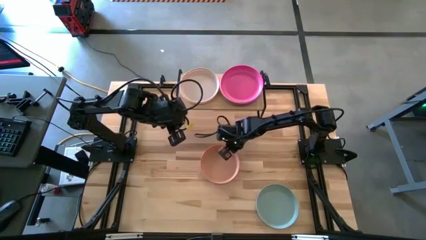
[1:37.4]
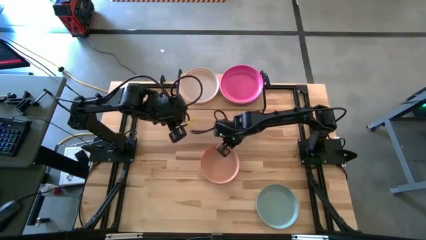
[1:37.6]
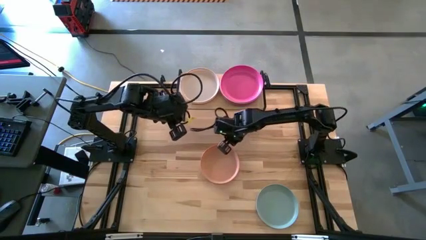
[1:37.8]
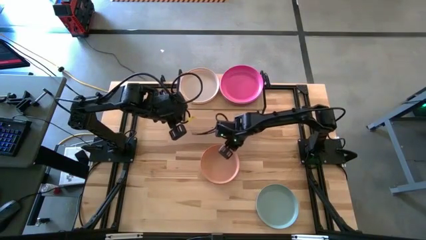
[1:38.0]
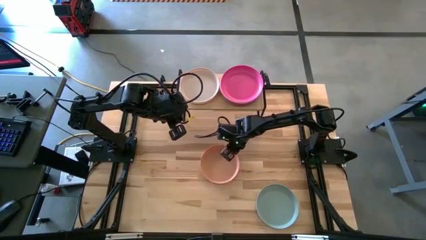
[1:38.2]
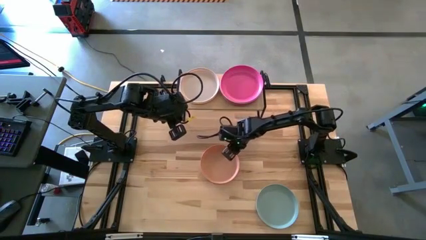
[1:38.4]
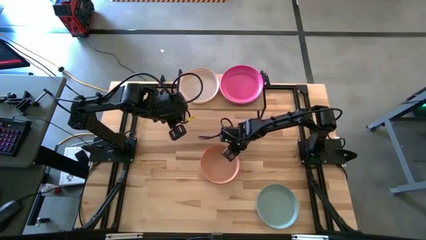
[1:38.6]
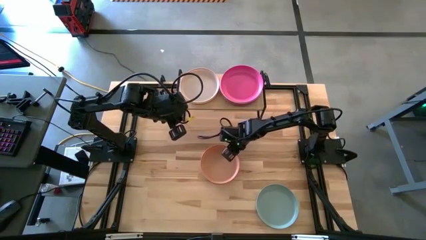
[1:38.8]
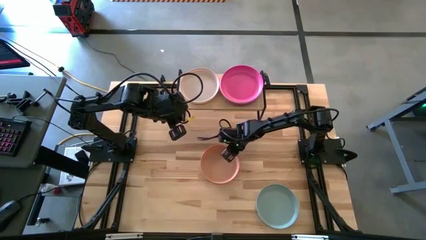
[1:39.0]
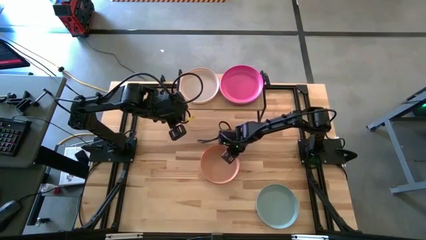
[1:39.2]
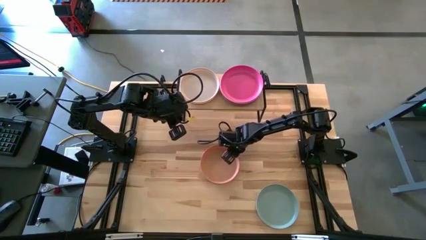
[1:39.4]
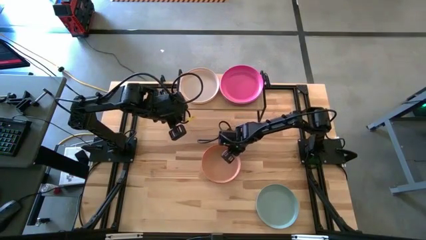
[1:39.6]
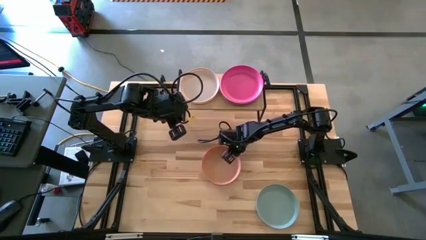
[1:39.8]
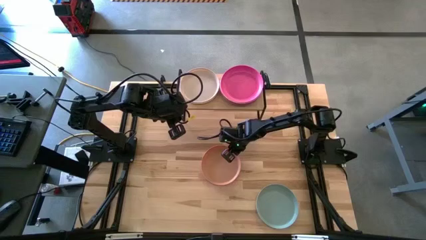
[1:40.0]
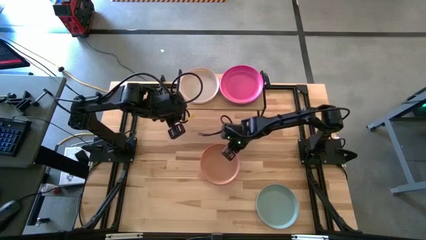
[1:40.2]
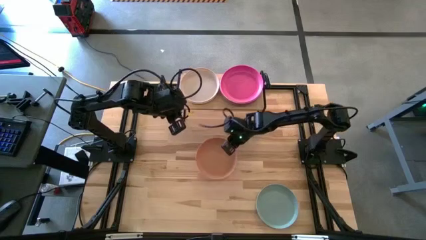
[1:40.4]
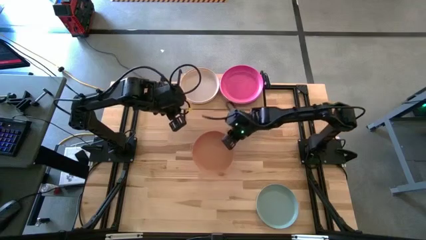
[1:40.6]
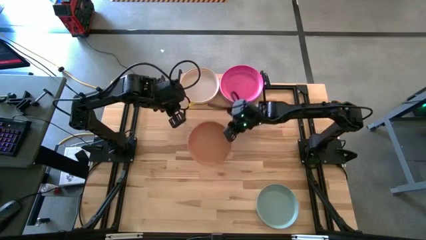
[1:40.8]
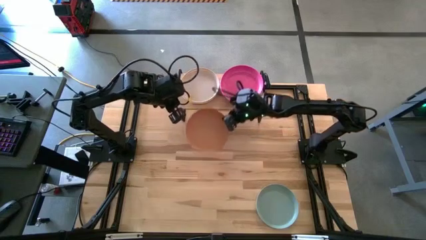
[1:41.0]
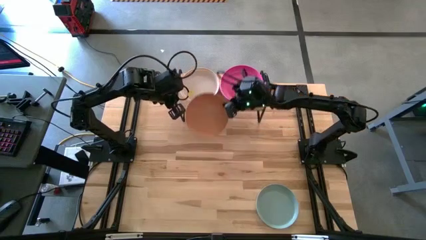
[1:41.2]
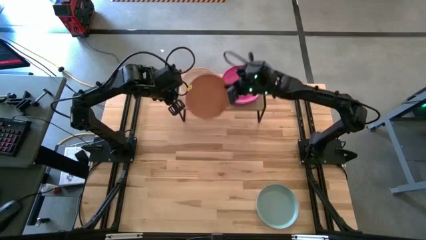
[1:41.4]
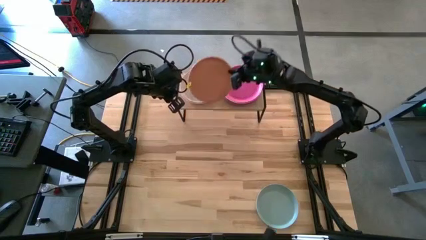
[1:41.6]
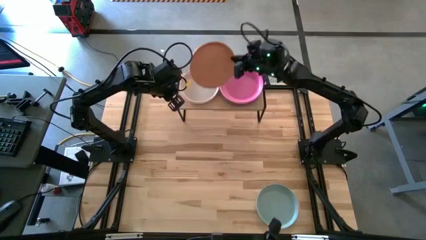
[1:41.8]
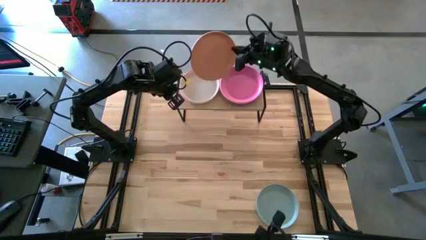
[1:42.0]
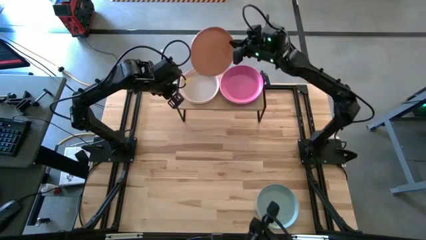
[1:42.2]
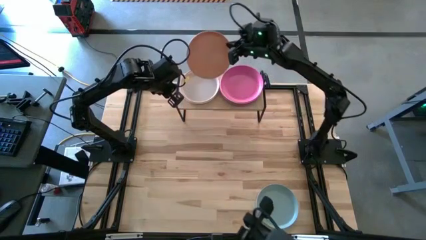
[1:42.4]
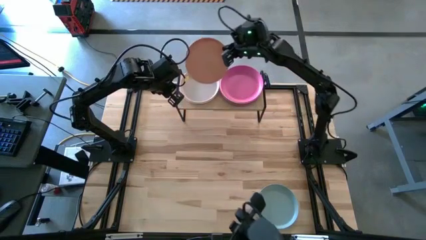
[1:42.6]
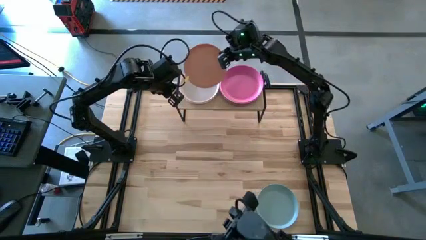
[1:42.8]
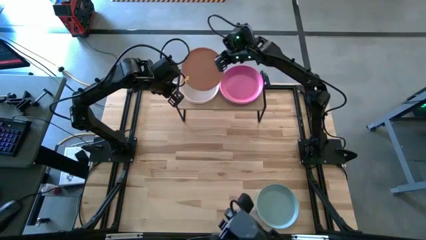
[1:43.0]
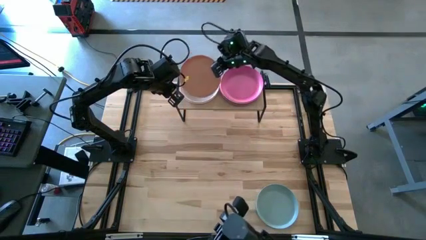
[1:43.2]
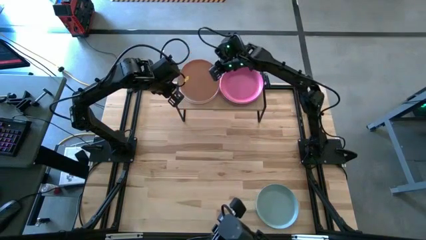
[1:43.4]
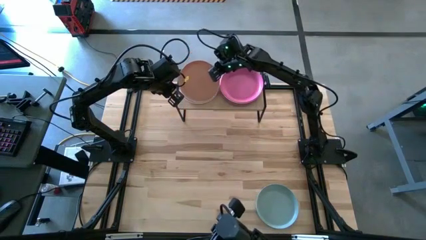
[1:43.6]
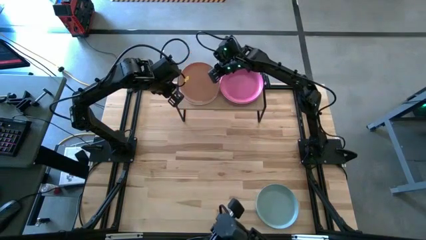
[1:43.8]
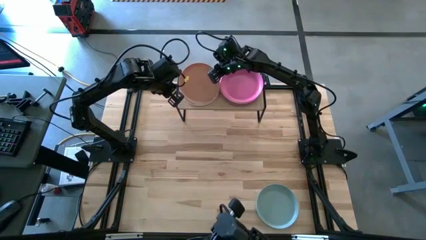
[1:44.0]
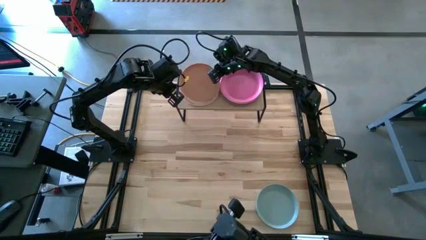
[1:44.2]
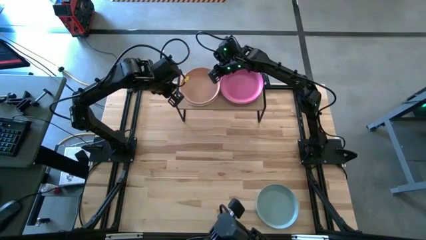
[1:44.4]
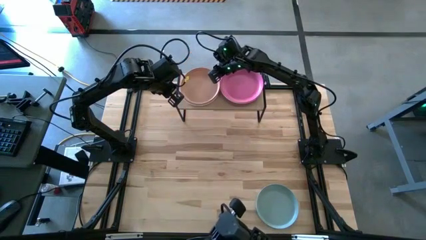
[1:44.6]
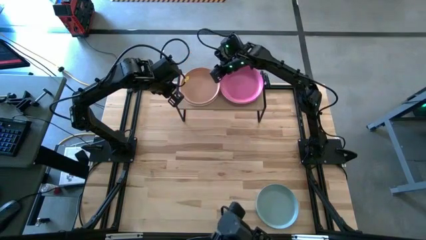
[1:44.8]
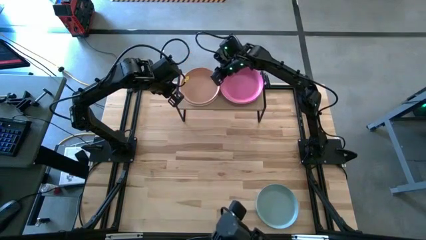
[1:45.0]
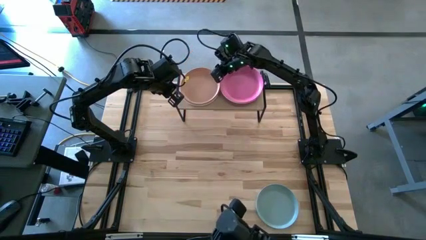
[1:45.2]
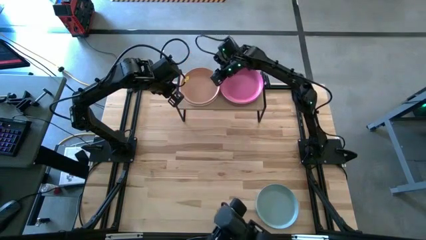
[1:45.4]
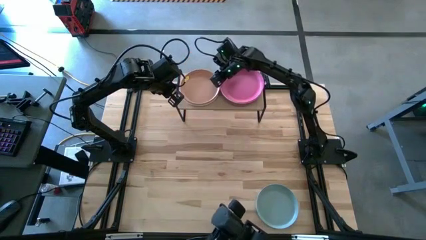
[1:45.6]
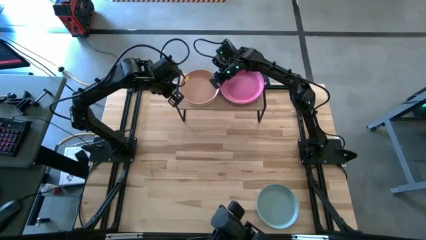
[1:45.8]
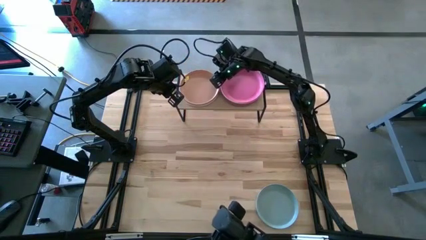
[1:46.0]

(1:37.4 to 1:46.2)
Task: Place and stack plates onto a shelf
Stack the brown plate on top of the white plate

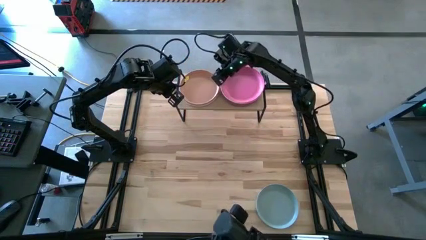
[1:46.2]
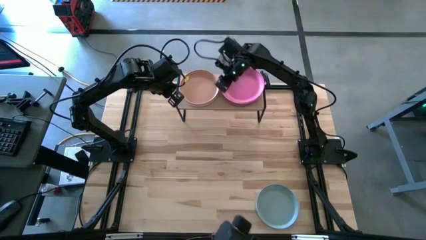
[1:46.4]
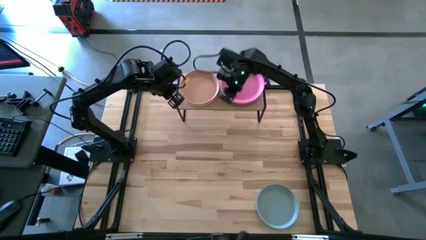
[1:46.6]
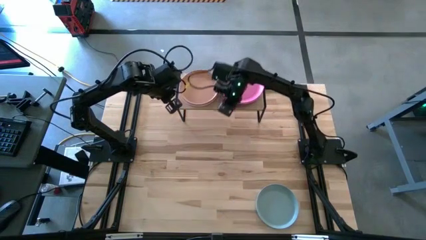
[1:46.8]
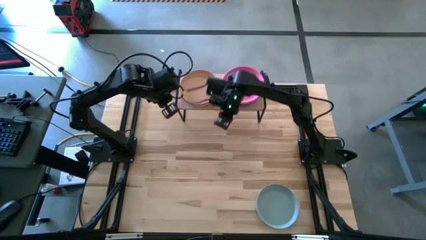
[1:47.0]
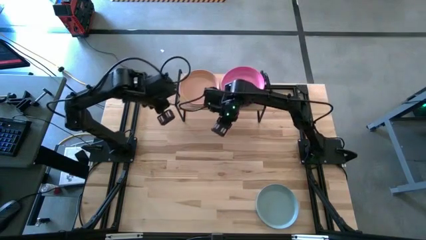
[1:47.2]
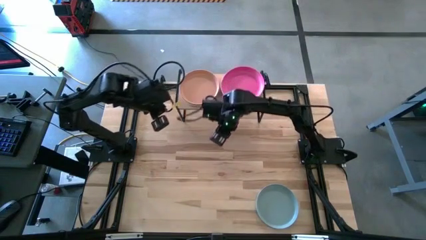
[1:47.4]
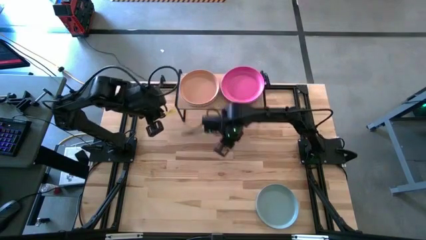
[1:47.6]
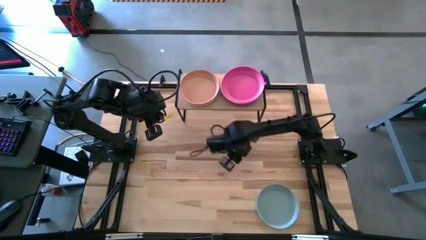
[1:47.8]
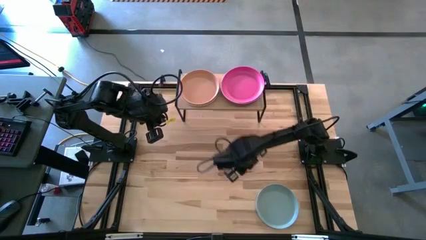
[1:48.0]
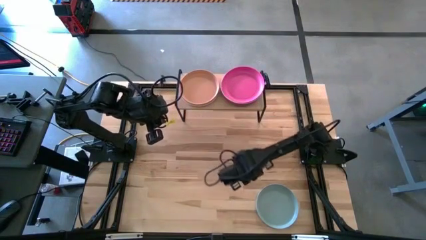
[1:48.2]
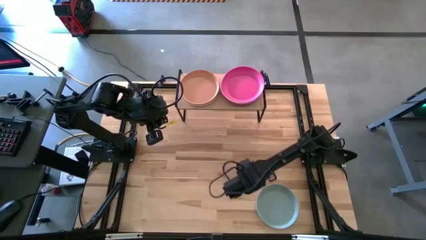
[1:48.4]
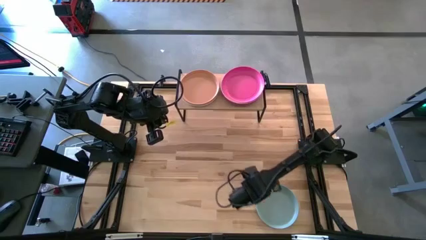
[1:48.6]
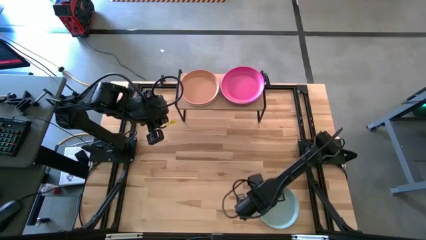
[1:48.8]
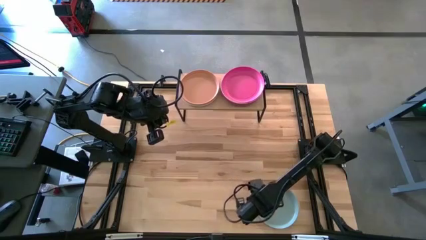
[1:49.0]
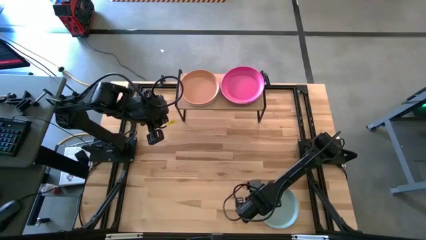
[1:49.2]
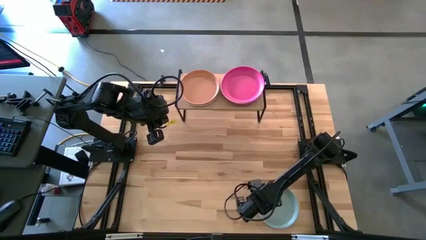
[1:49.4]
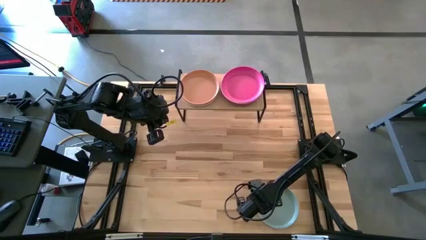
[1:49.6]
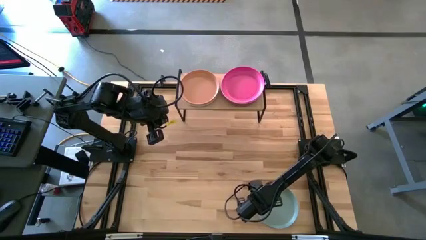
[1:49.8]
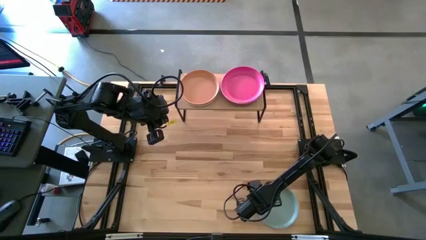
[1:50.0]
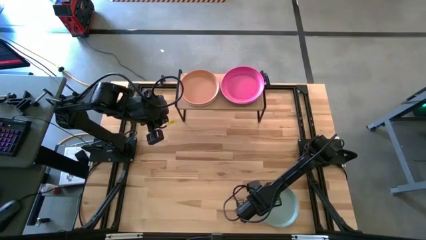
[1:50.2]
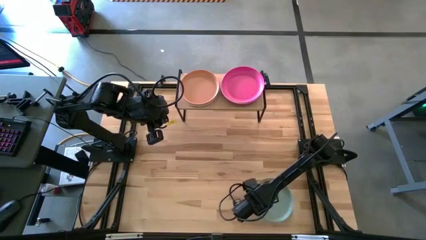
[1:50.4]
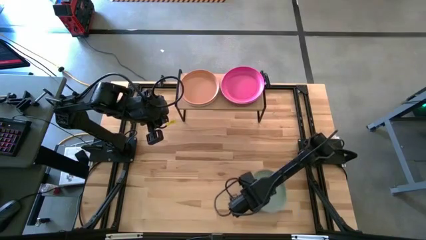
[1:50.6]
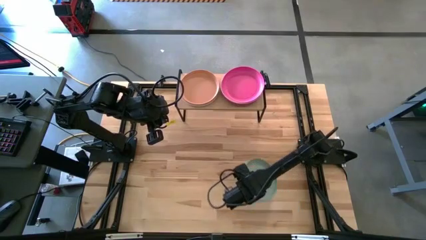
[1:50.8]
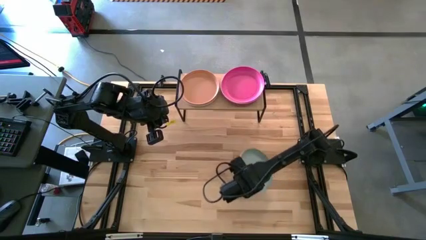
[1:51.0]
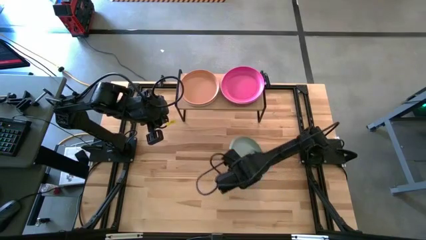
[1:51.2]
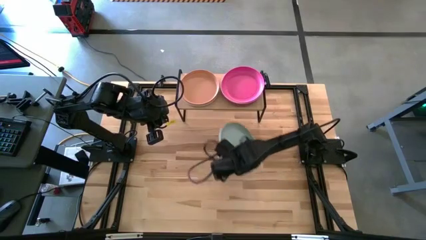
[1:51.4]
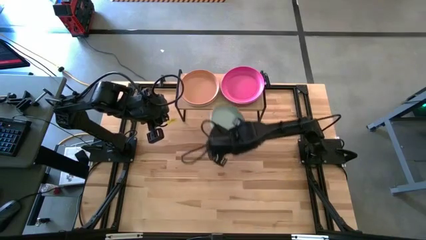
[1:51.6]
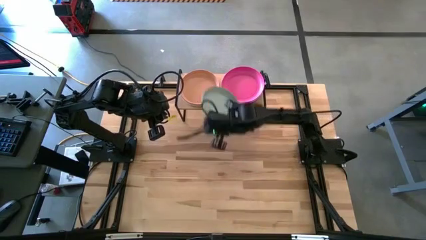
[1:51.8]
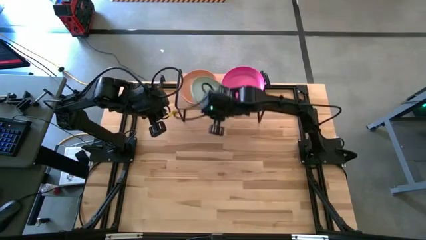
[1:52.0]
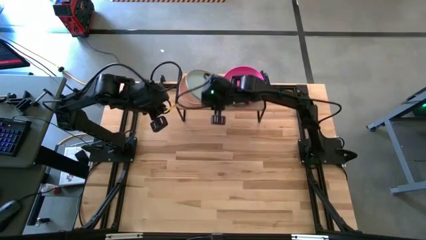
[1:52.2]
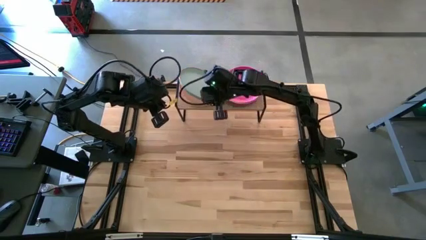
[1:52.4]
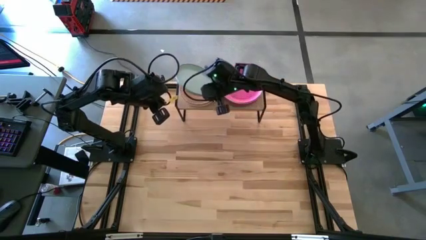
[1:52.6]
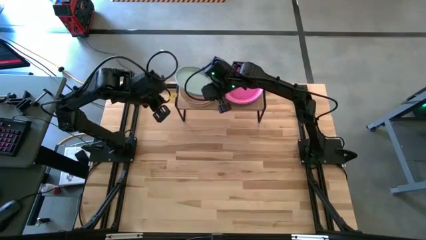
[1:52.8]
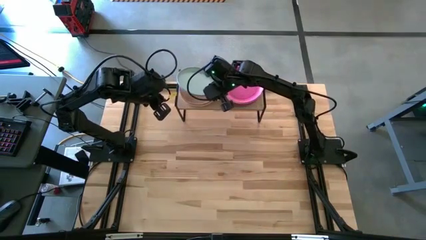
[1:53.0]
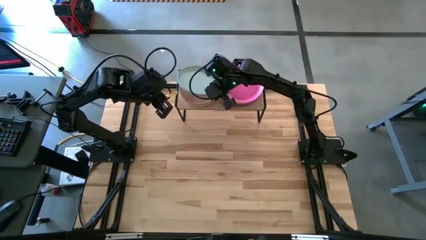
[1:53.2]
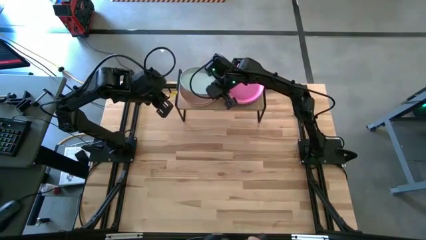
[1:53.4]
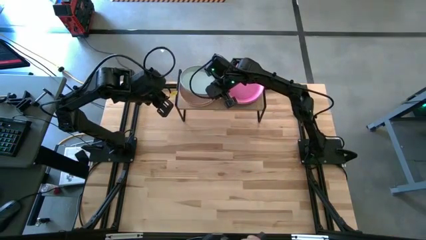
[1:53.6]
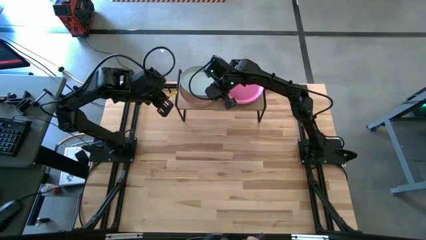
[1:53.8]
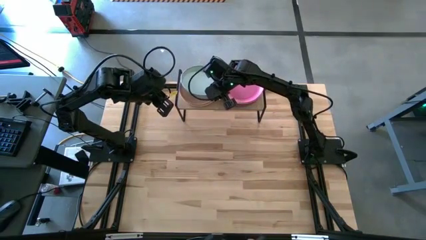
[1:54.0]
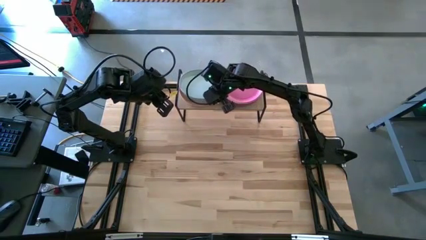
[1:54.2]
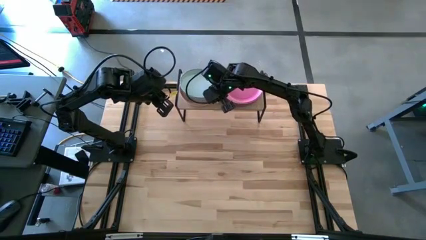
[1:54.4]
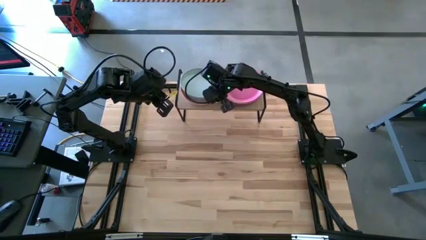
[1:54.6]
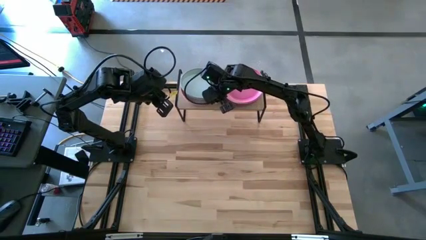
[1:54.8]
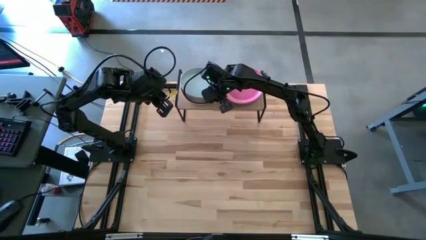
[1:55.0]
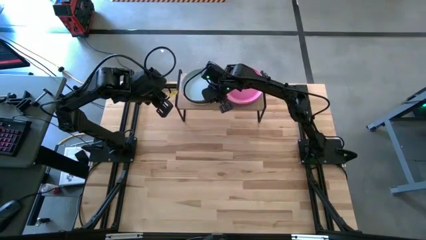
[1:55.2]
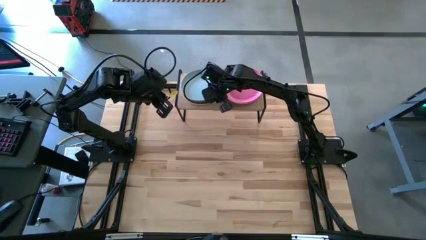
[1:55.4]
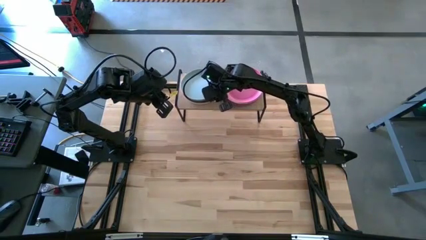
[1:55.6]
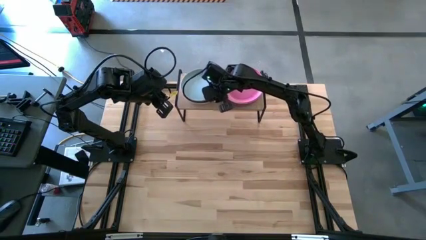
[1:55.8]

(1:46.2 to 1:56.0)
Stack the blue plate on top of the brown plate
